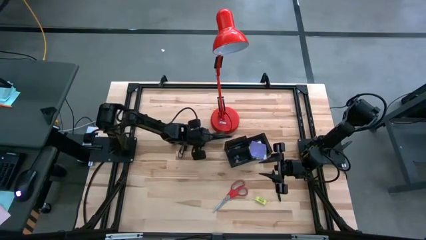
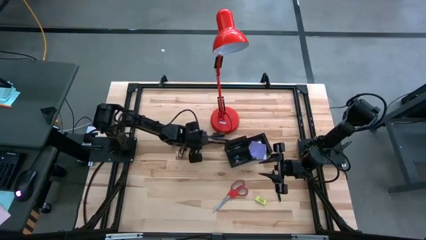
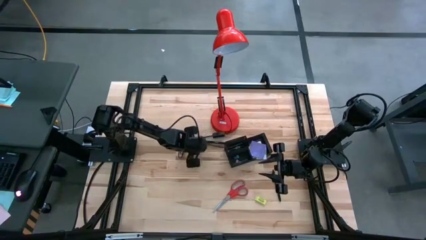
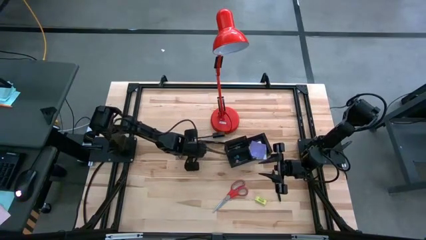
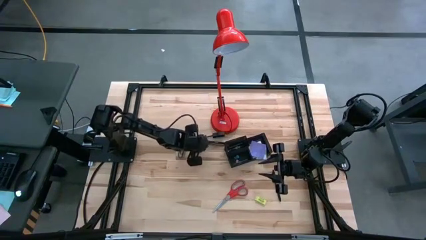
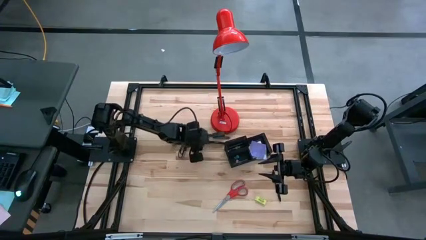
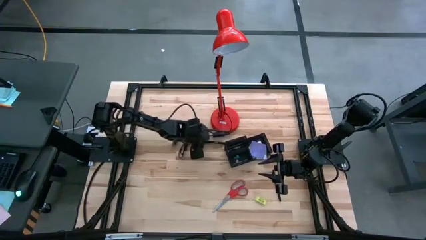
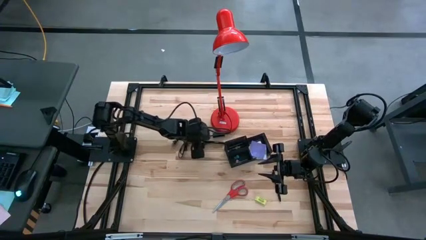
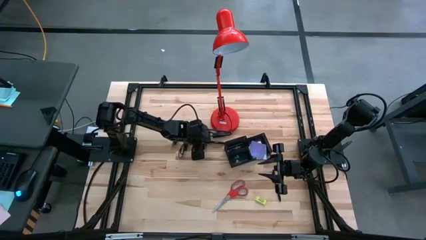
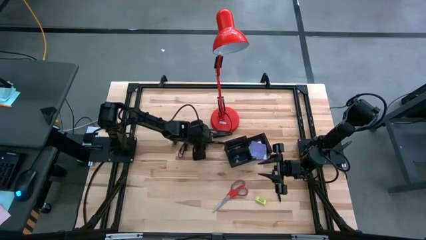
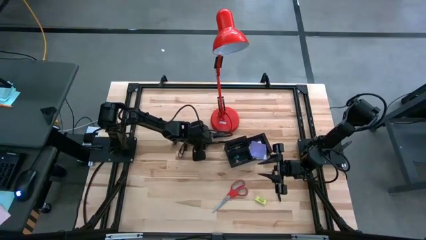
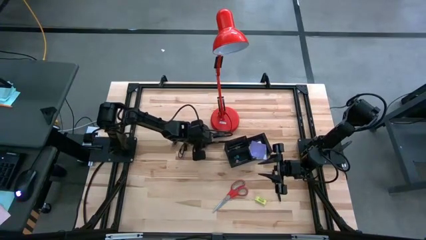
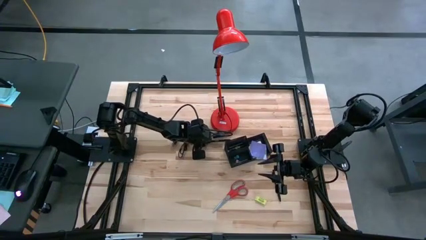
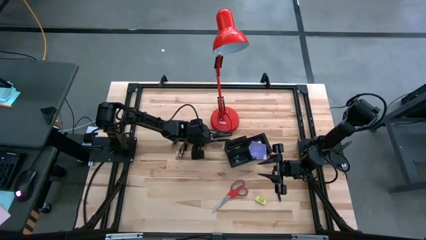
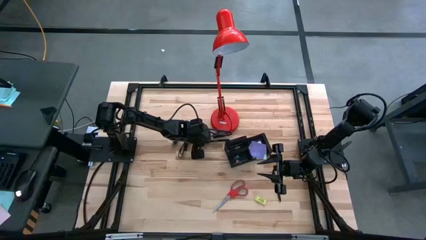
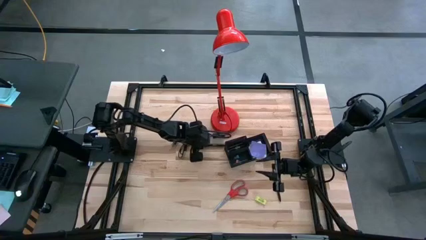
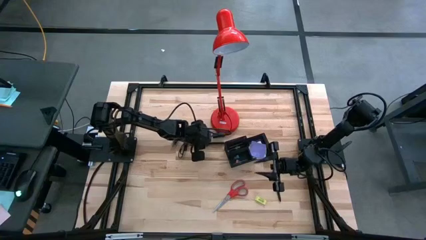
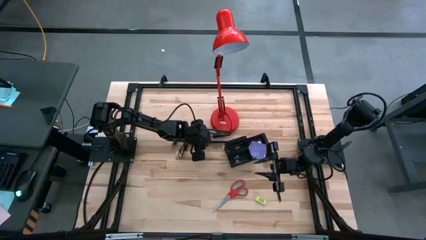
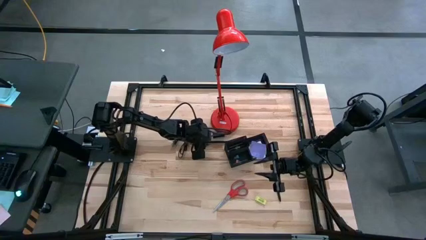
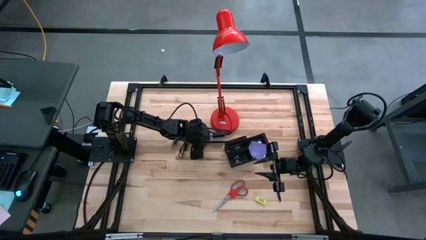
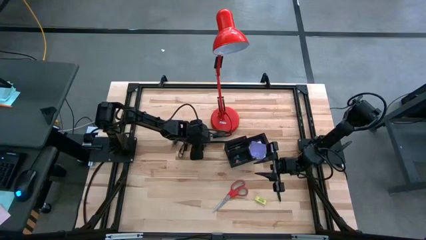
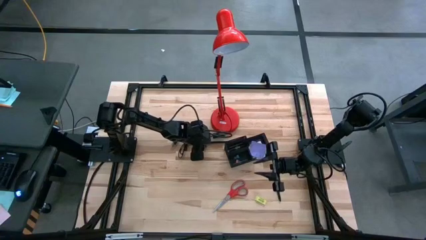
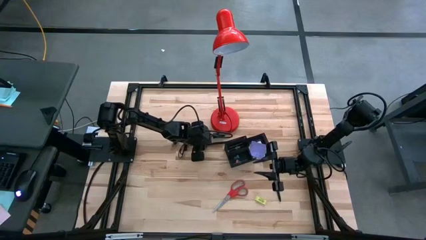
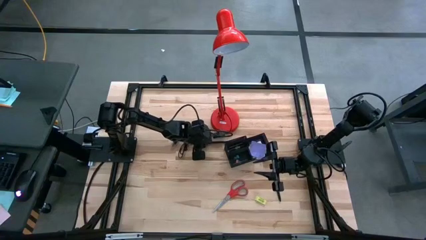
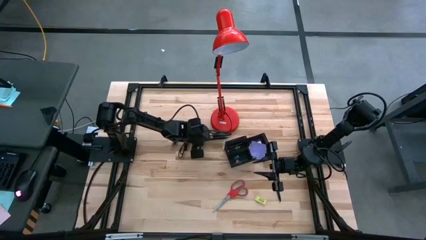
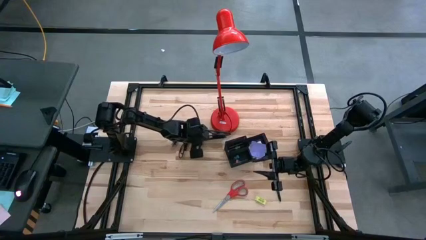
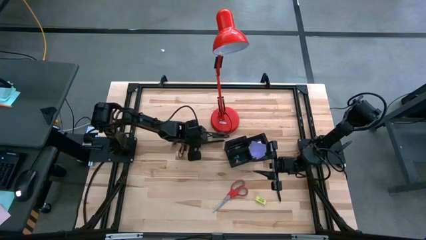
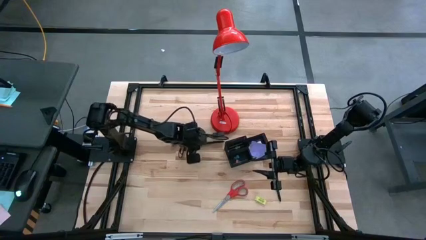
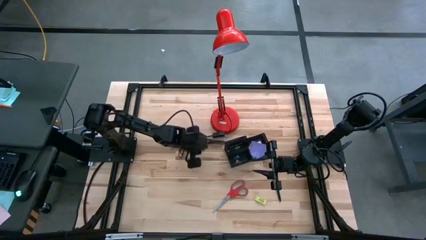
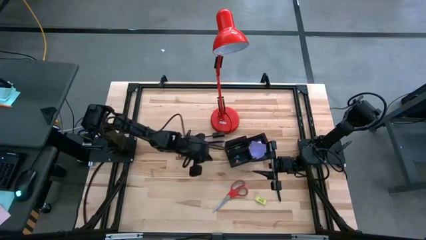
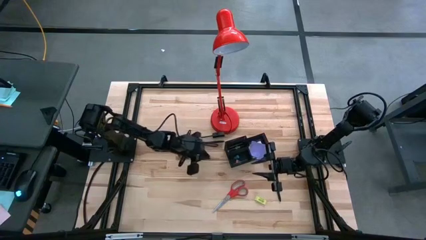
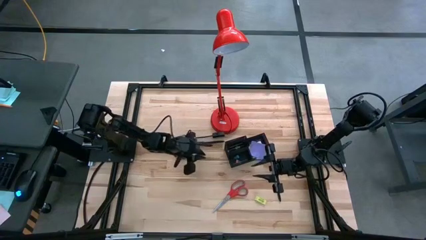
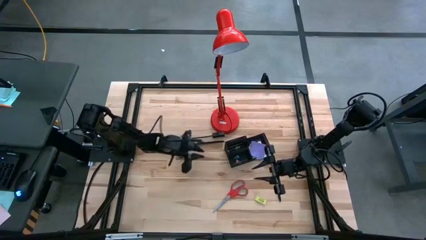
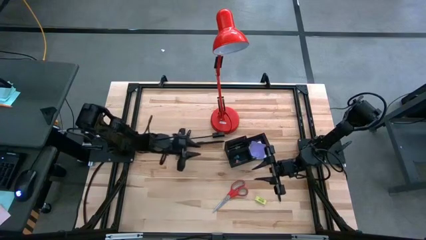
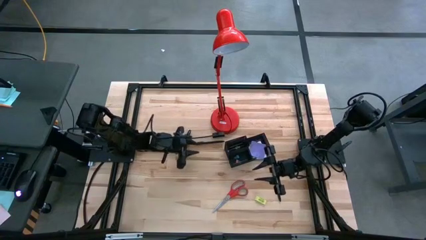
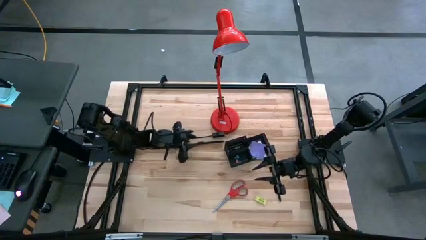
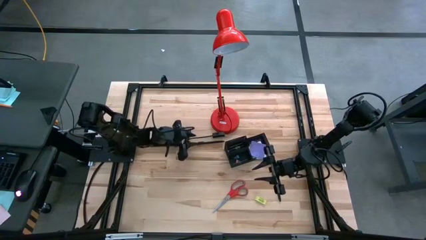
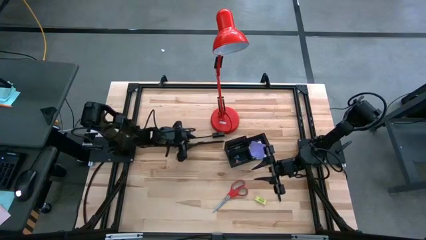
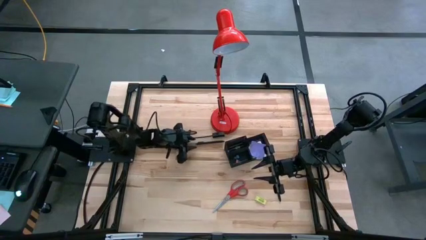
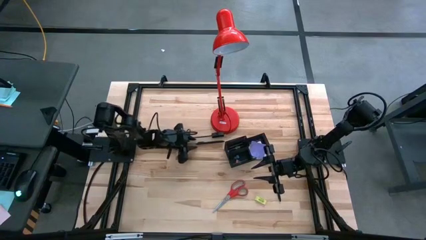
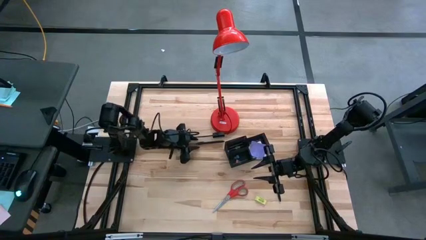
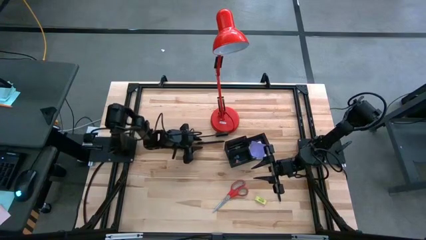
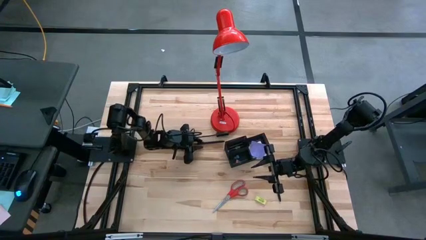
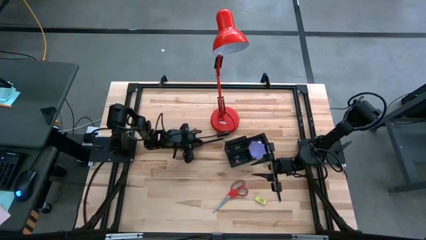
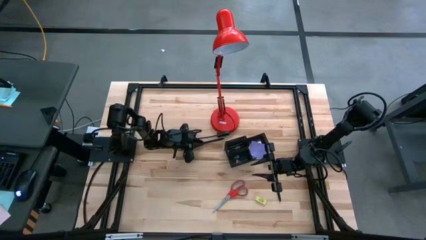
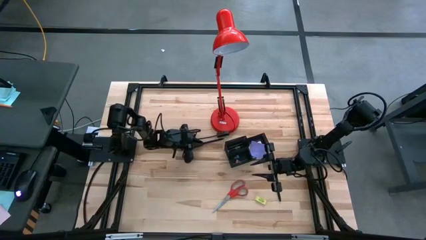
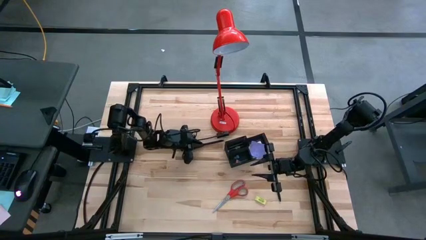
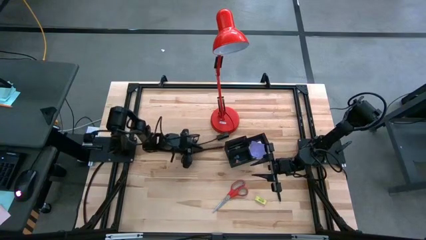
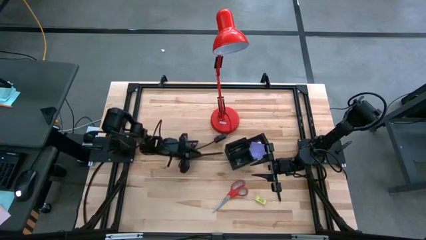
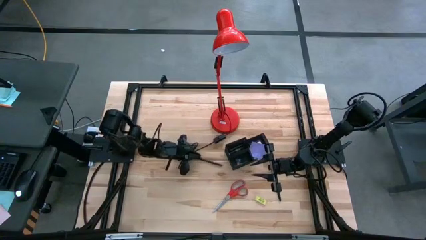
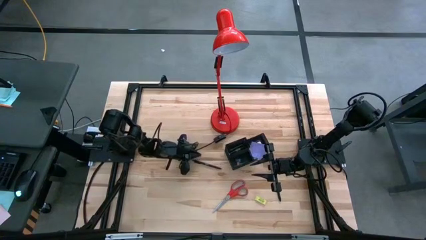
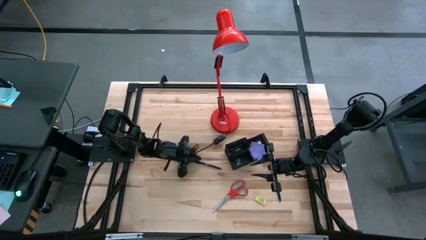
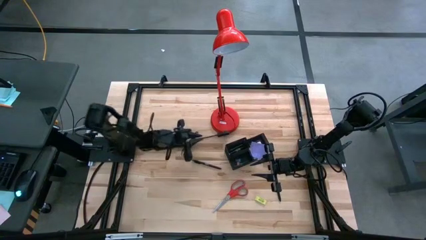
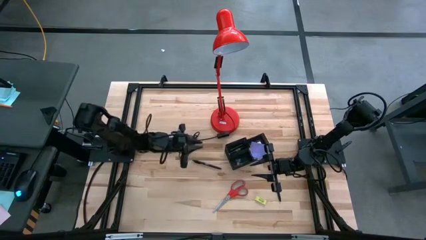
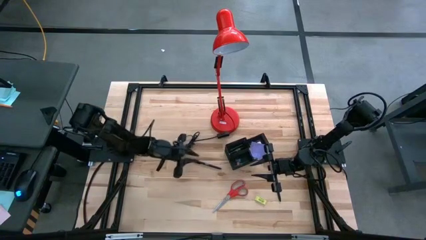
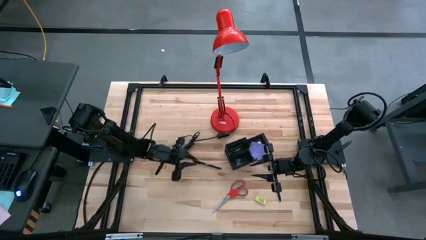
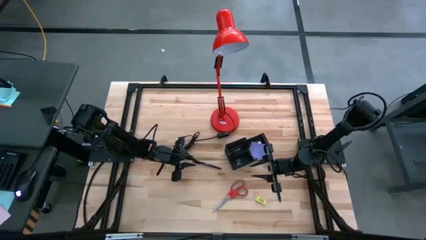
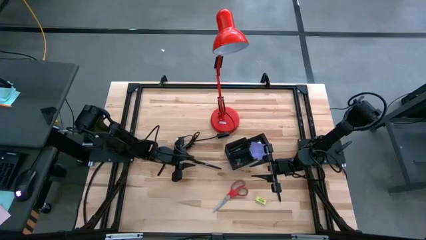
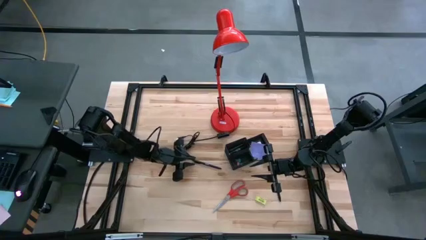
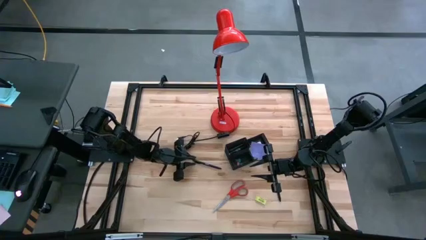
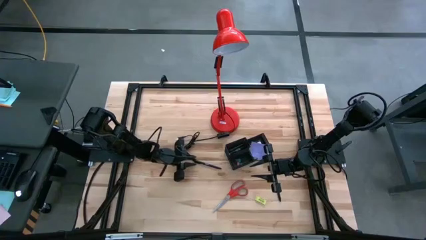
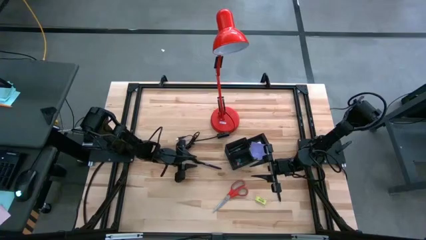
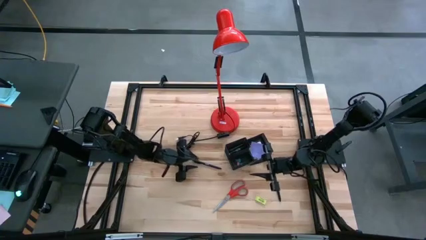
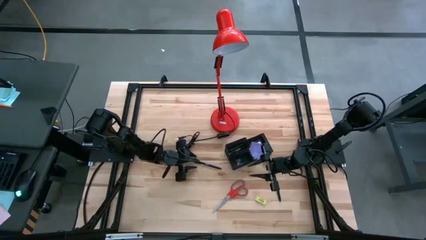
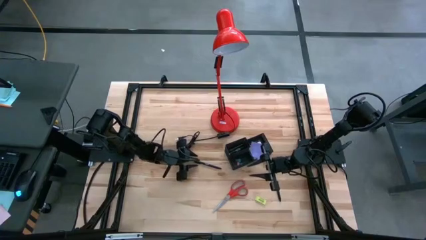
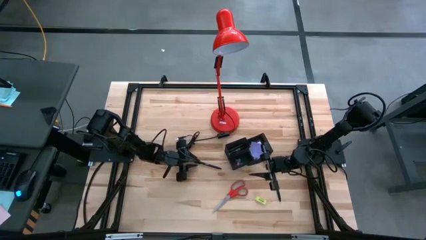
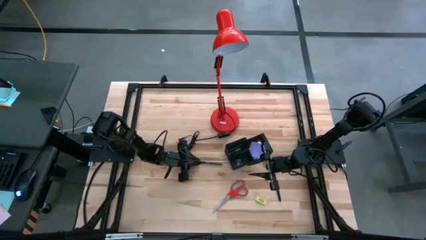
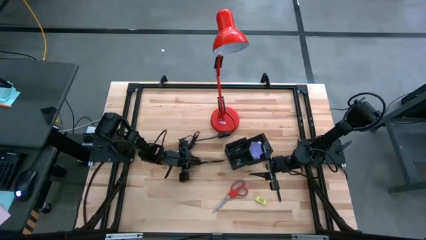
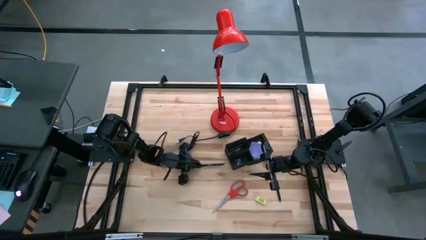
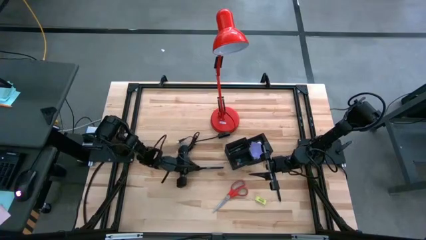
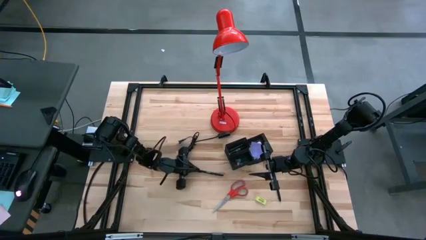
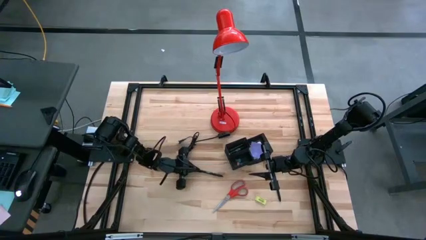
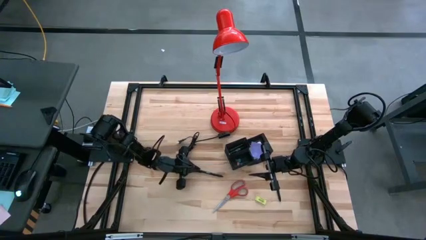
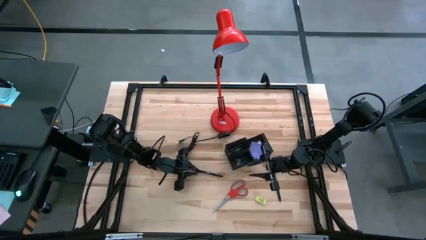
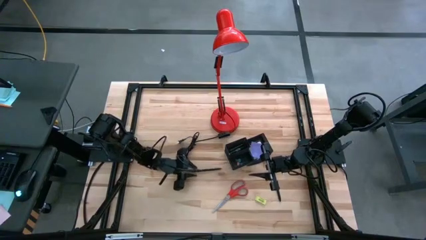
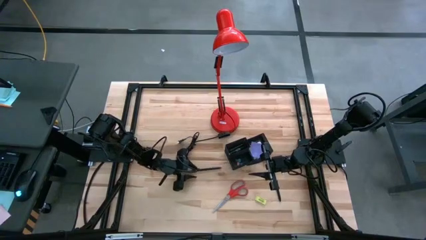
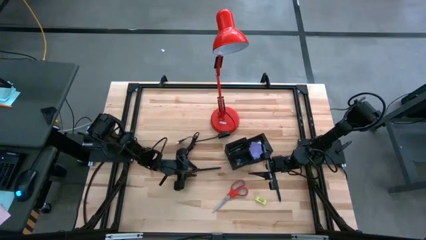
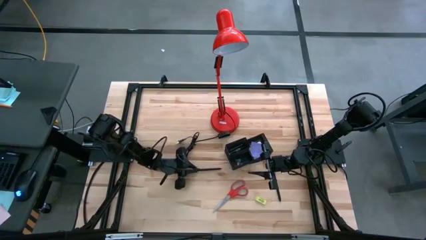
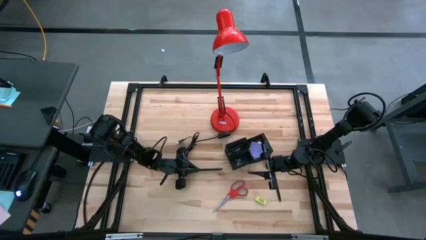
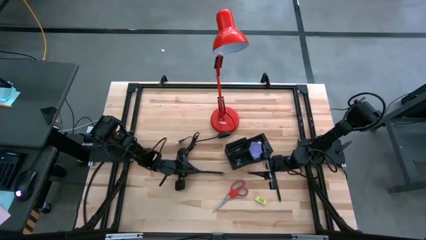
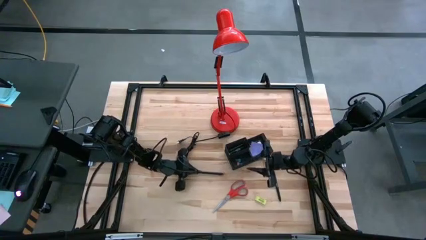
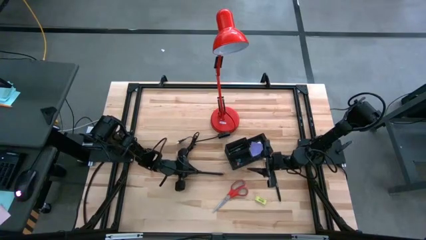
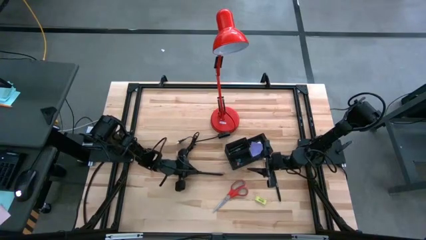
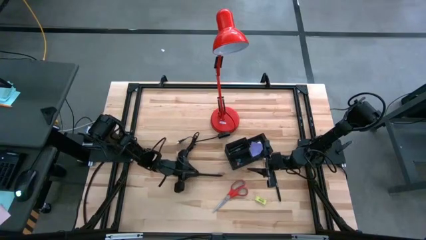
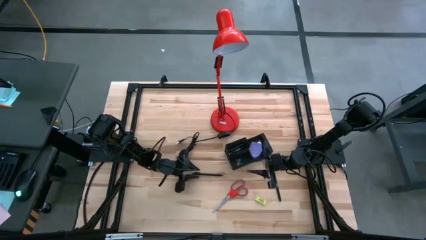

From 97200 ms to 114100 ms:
Task: Pick and place office supplies into organizer
Put the black pen into the desk organizer
